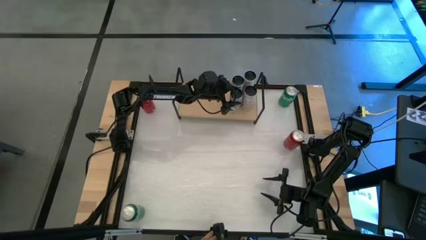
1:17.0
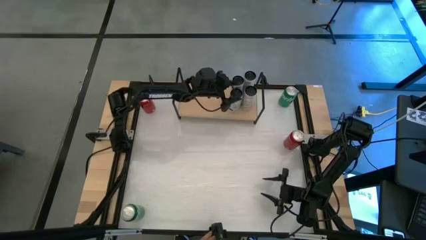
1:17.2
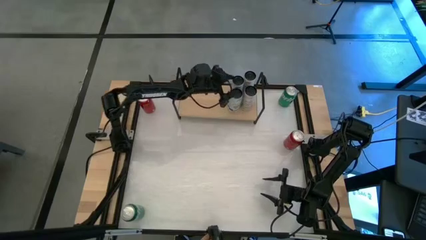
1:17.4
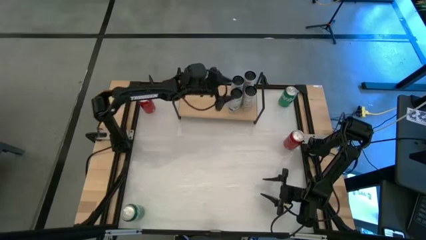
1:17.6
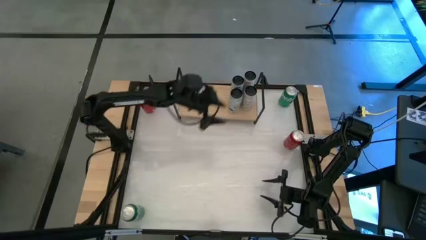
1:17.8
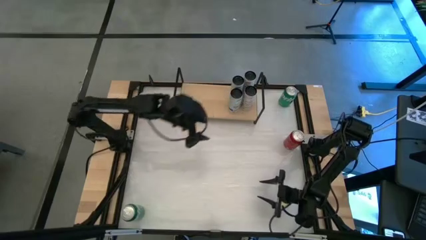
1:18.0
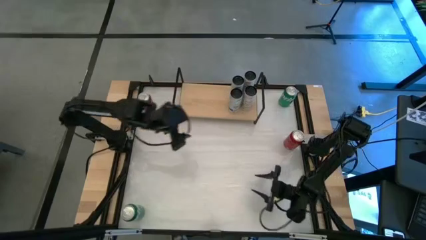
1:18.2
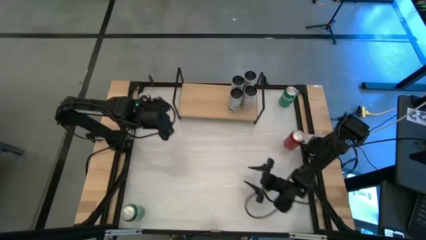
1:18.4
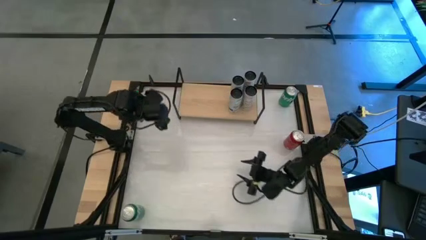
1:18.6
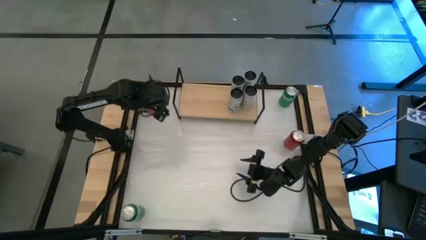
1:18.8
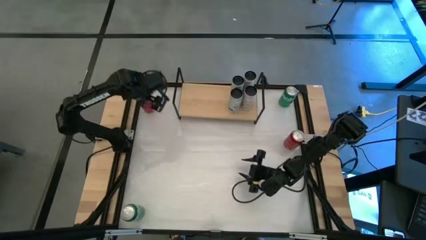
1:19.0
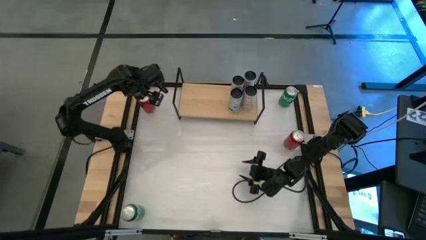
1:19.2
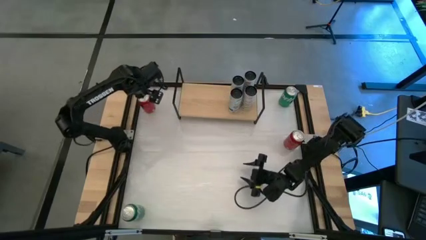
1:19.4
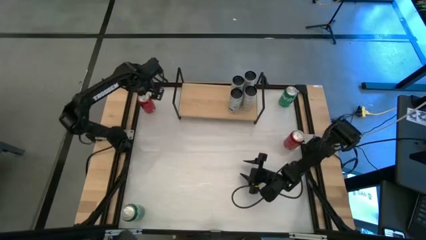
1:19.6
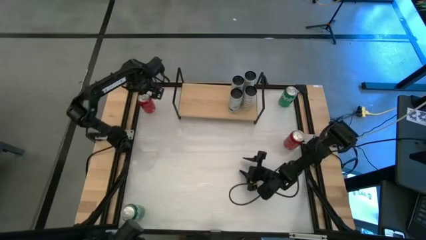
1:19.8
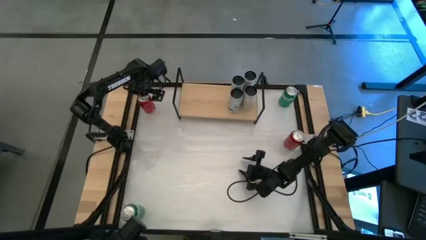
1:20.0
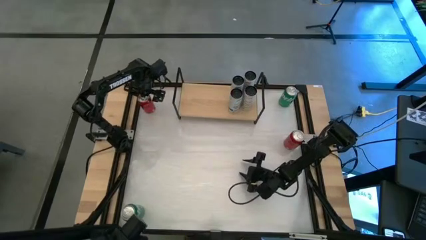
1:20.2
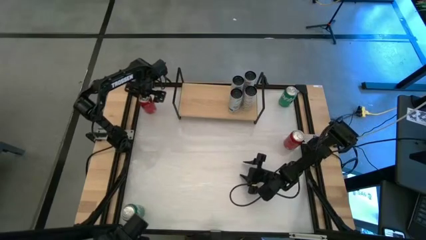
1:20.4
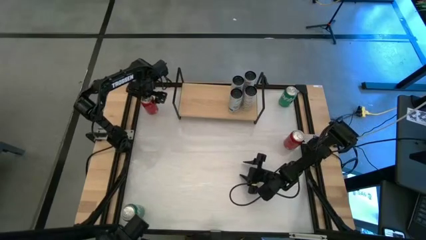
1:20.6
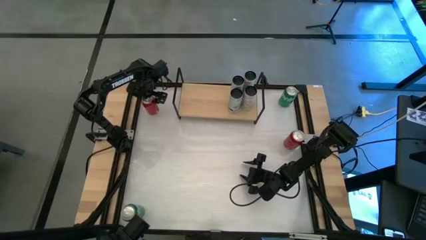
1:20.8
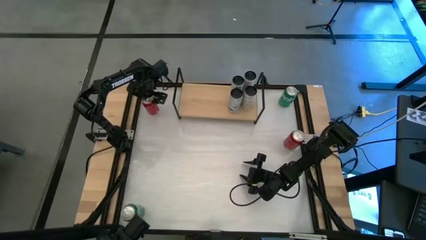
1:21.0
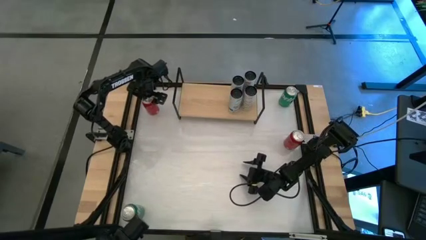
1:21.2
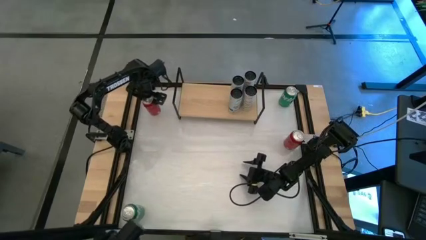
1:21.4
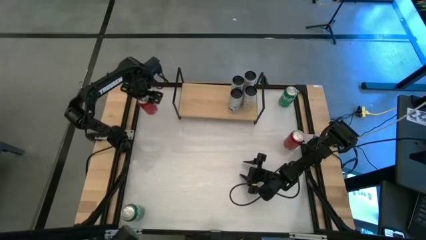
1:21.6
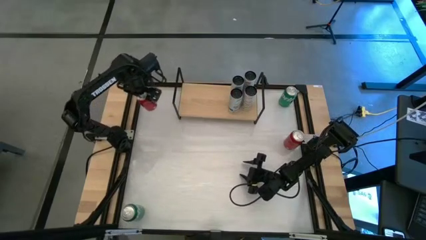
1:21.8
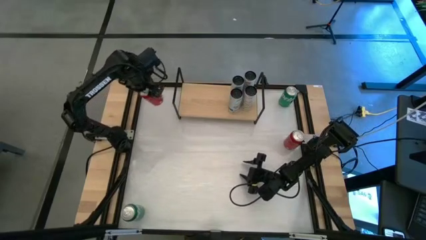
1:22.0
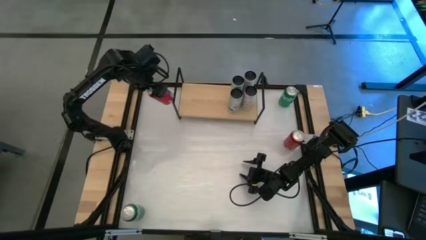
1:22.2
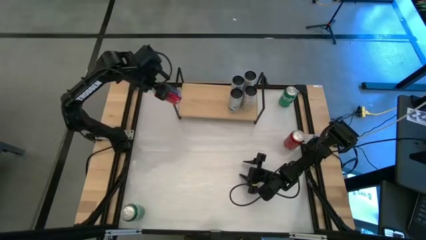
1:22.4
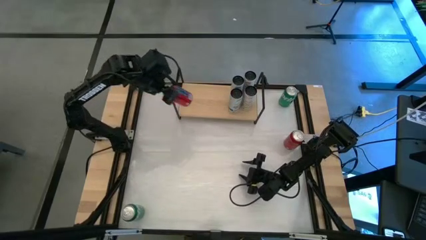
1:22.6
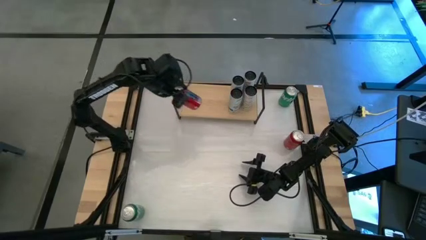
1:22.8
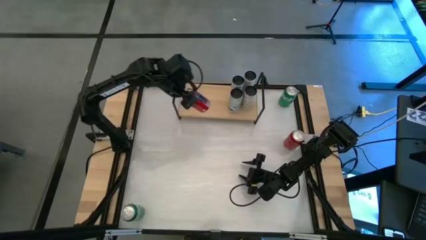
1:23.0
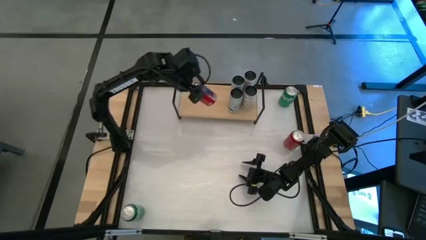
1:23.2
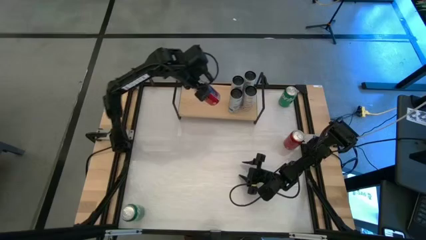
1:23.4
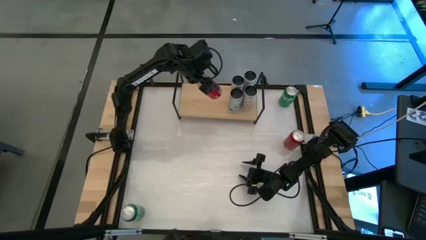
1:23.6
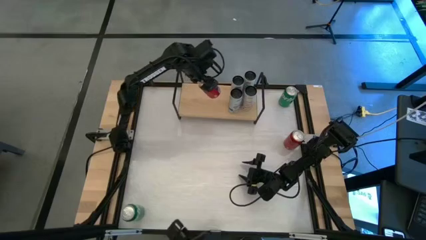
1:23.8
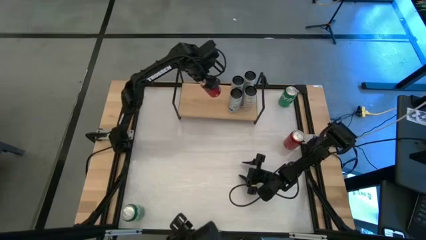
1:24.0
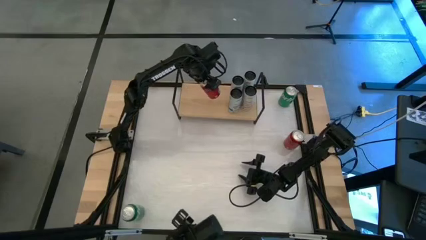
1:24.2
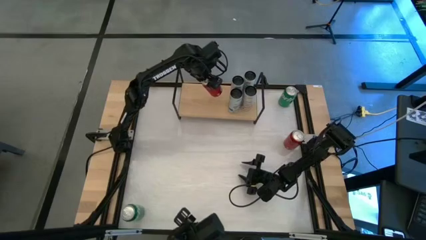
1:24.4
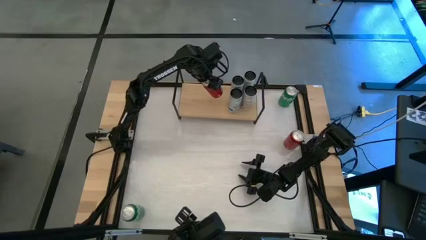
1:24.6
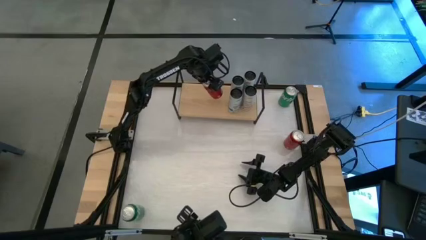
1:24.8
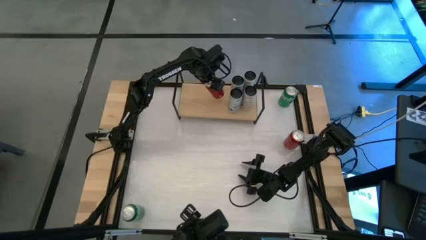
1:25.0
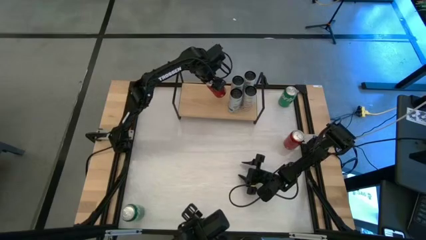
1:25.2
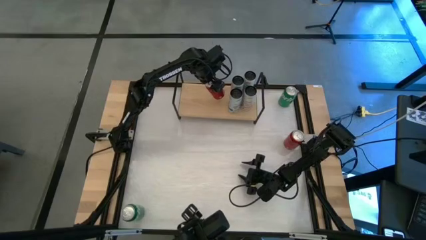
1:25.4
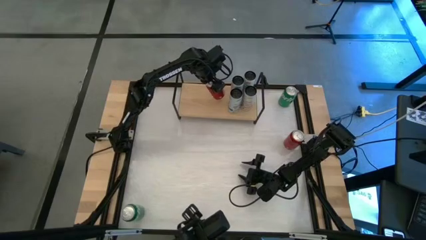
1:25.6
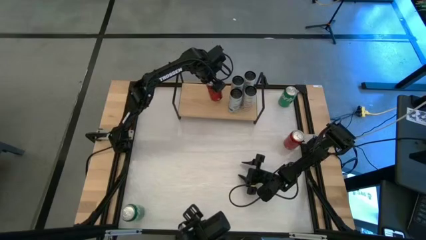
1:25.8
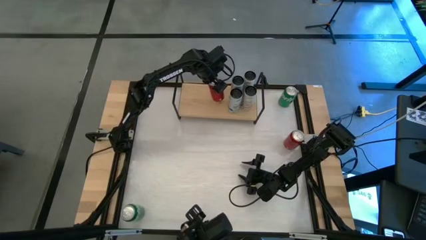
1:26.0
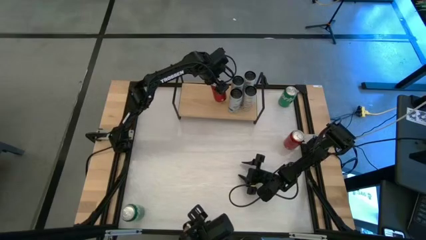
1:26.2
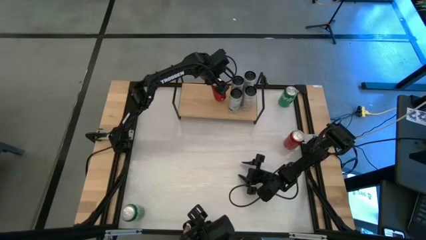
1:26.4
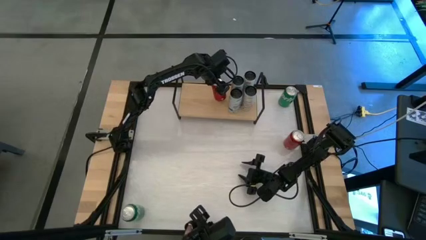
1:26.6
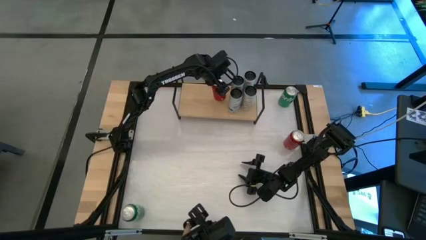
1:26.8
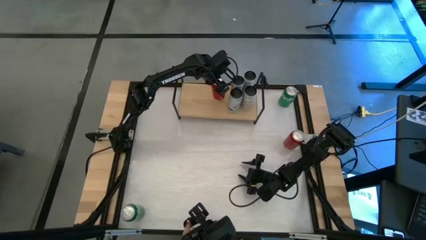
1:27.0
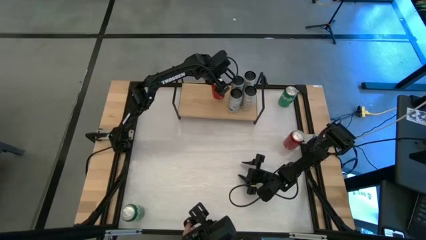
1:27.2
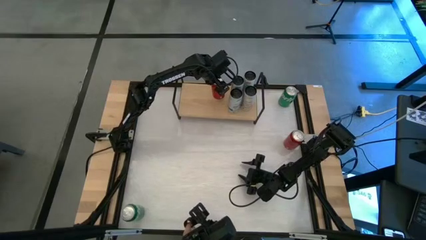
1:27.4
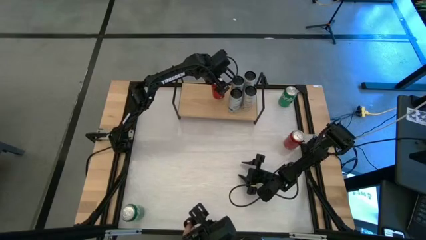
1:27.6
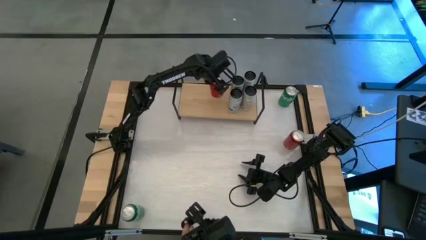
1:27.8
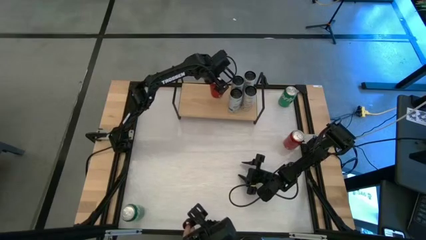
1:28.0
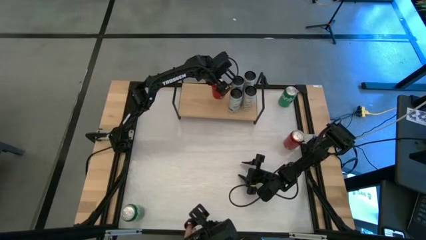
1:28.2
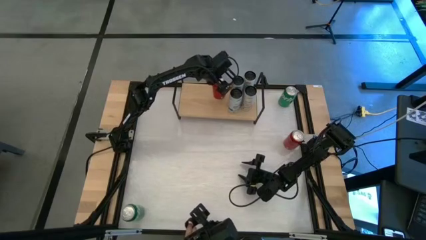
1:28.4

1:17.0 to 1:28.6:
Task: Place canned beverage on shelf
Put the left red soda can on the shelf

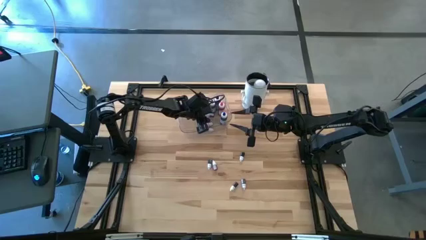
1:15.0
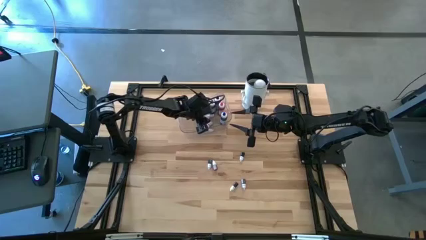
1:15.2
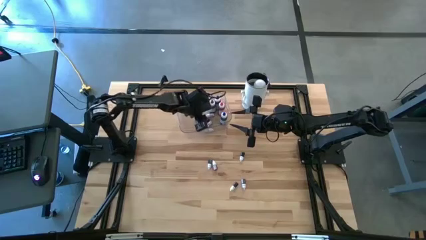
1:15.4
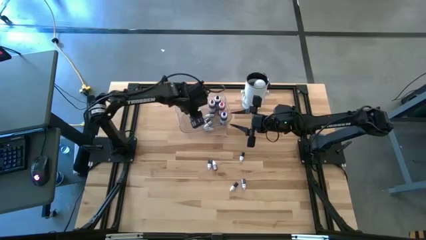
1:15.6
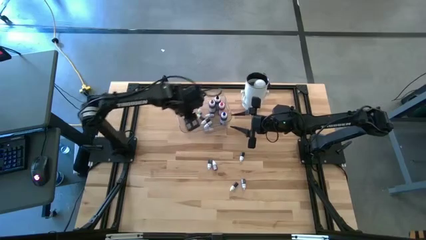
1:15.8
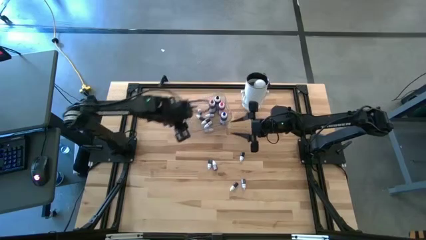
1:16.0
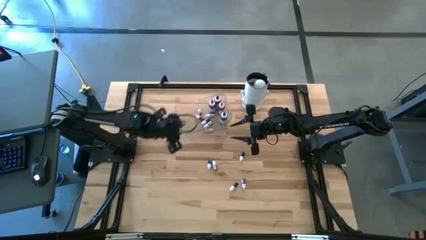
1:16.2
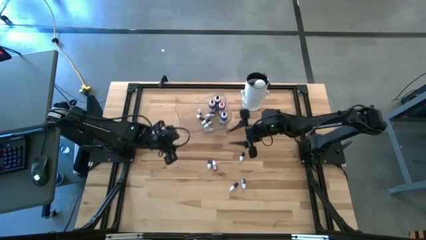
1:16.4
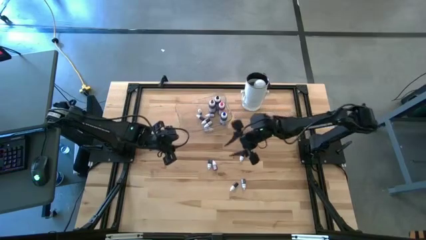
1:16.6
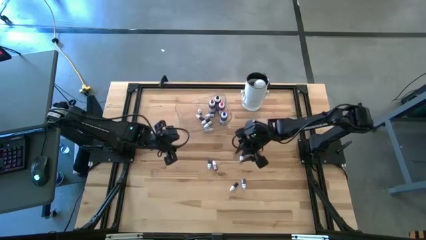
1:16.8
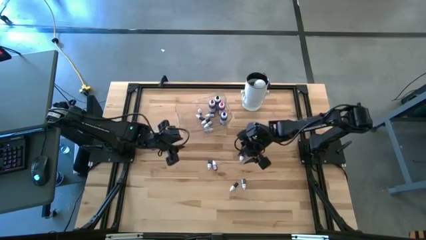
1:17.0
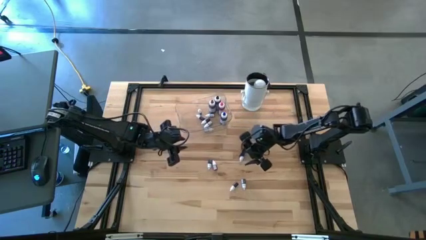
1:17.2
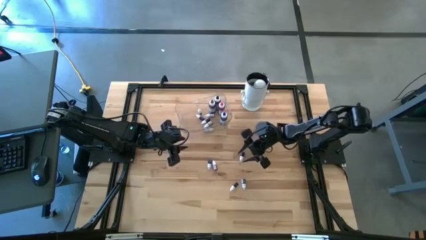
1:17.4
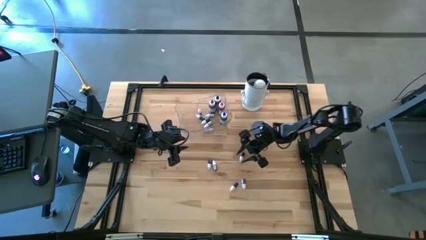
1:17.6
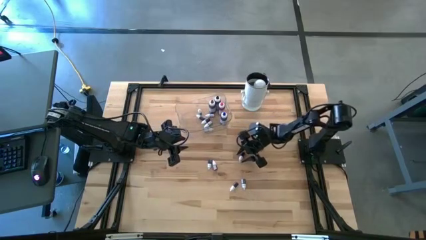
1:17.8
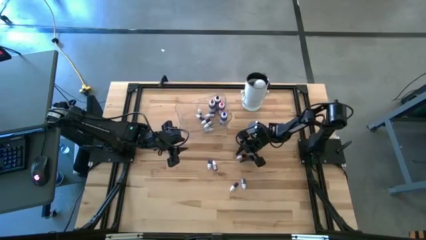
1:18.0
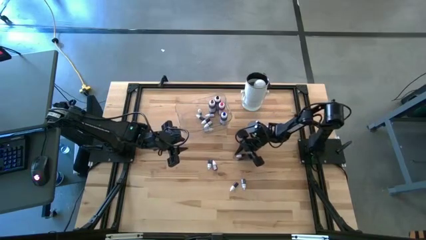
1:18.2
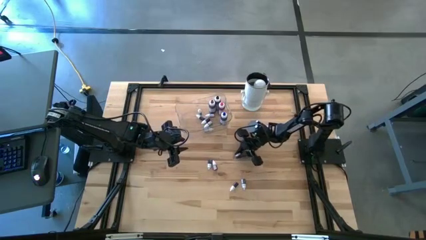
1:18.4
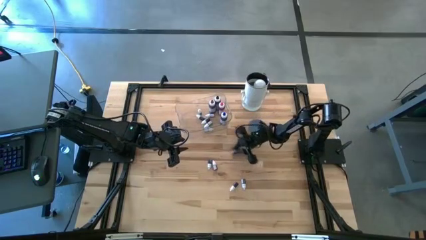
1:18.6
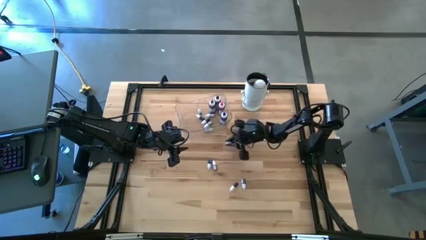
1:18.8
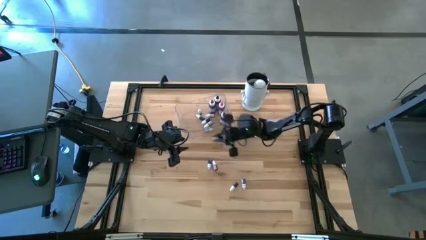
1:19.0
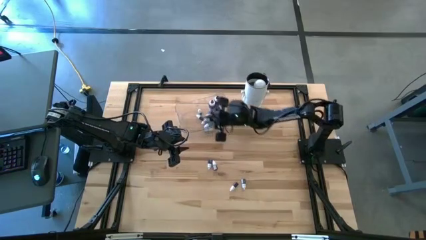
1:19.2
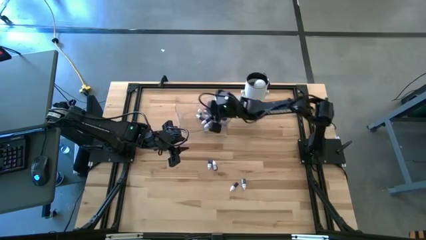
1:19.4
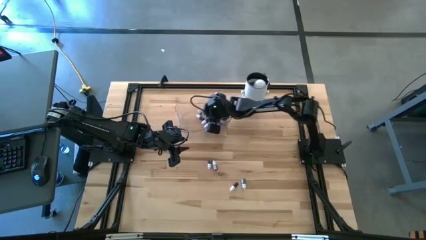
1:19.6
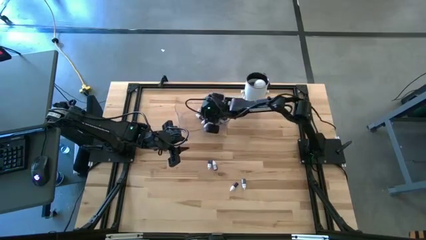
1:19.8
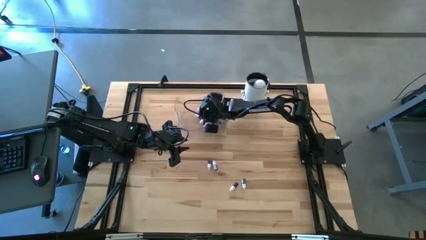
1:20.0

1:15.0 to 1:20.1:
Task: Pick & Place food coloring
Put the small green food coloring bottle into the transparent container

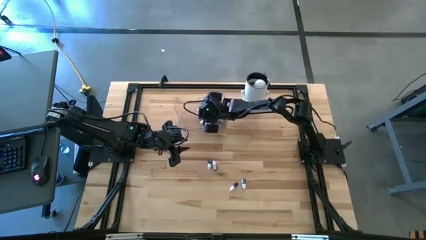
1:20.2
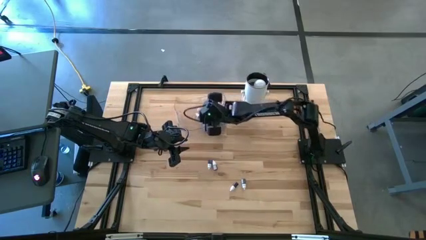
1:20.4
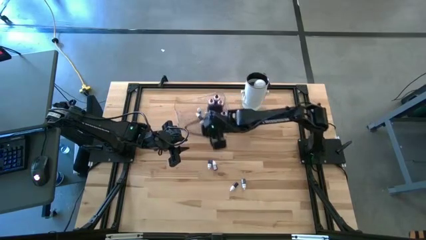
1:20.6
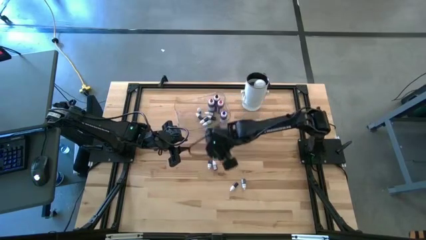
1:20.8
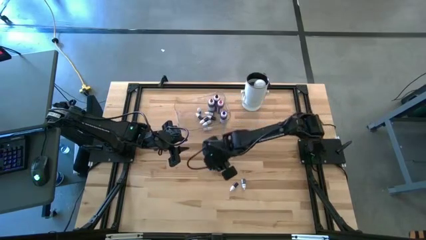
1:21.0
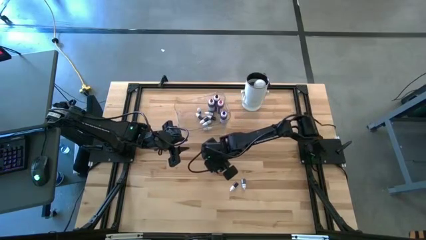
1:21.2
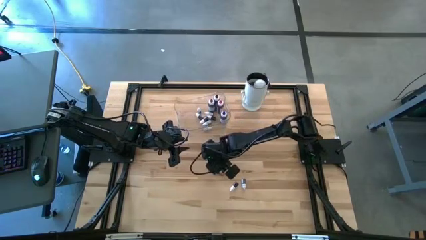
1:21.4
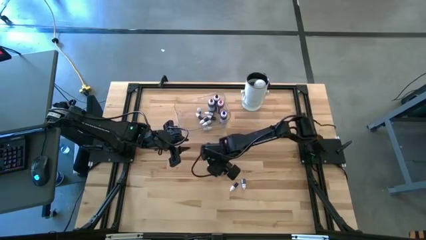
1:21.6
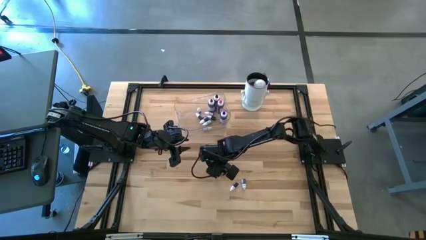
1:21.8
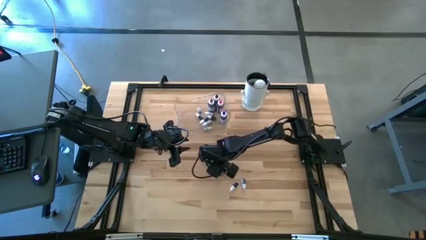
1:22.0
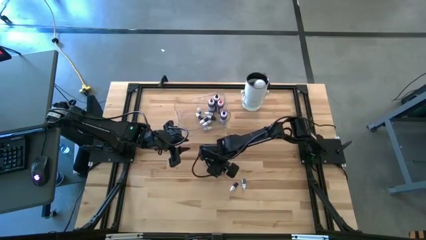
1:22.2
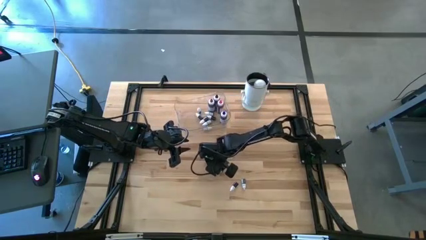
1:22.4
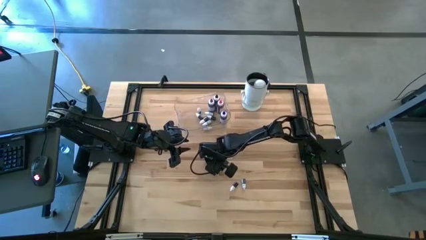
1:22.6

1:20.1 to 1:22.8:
Put the small red food coloring bottle into the transparent container
